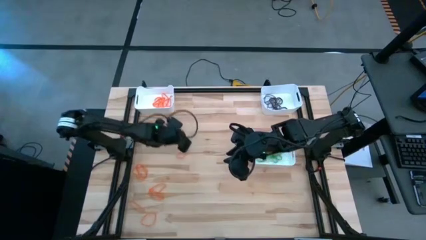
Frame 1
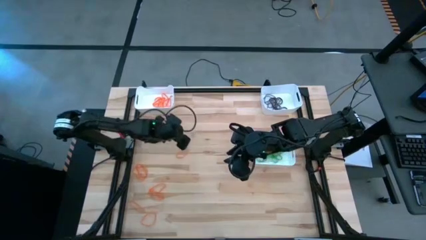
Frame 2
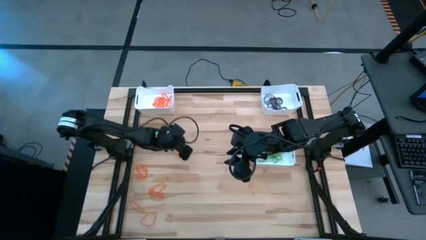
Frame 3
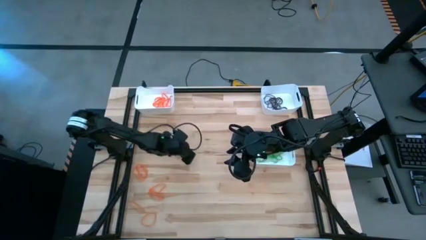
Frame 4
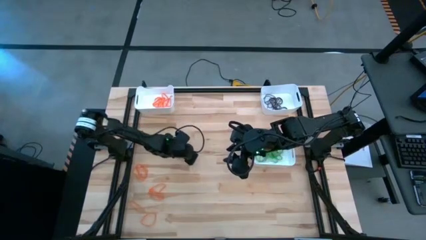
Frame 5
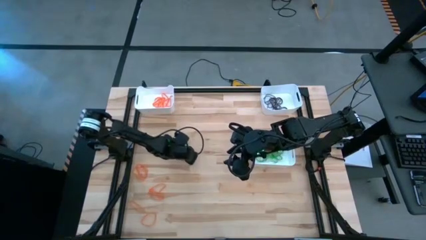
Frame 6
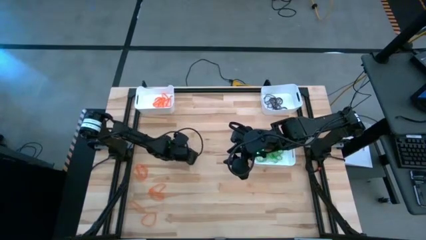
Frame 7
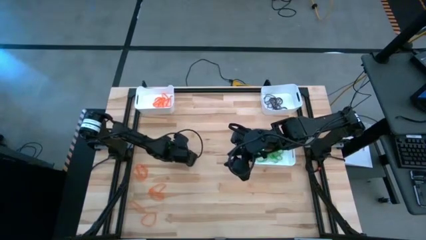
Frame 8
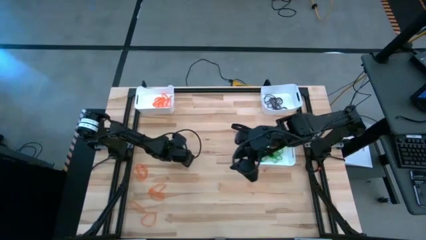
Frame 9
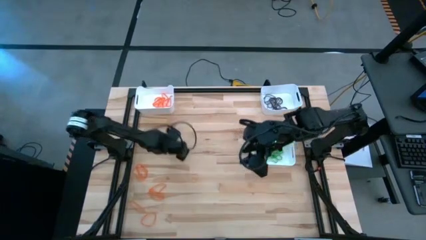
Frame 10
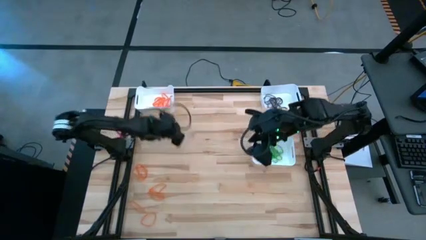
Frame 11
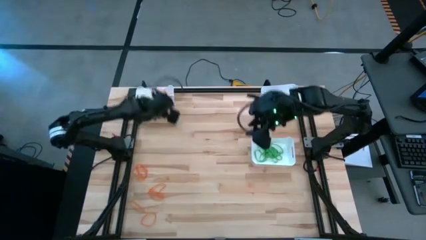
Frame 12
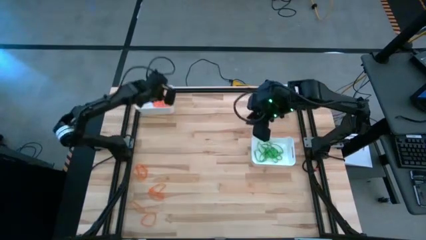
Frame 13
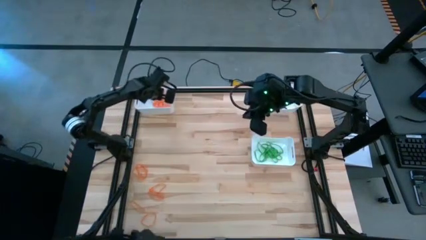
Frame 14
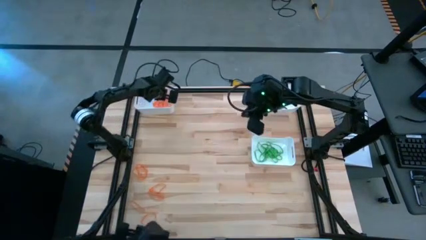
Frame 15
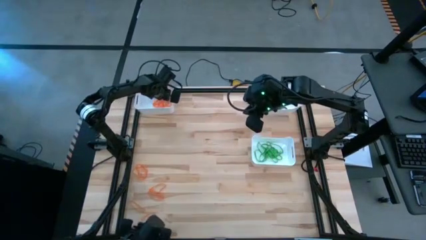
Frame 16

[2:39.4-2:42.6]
Task: Sort rubber bands into baskets
Put the orange rubber band into the top left white bin

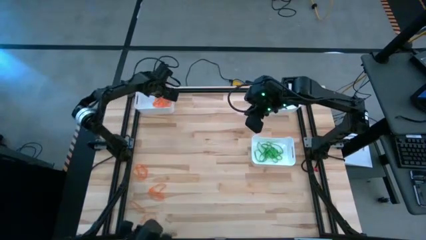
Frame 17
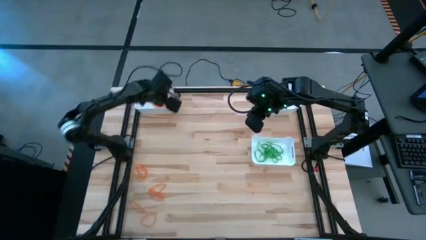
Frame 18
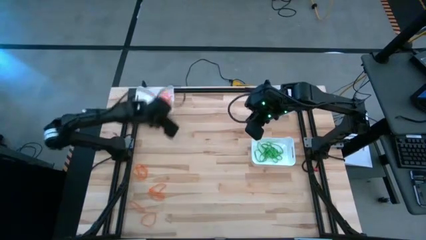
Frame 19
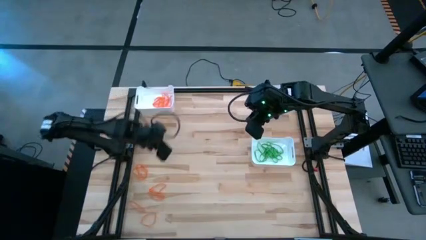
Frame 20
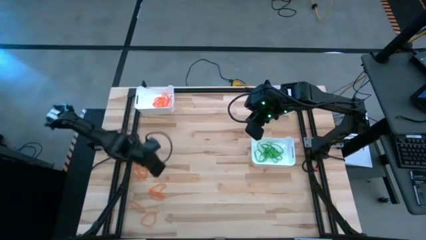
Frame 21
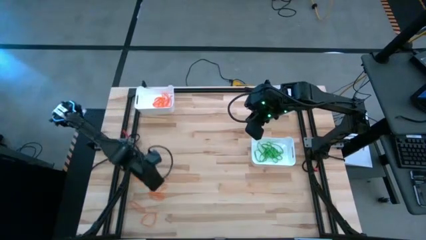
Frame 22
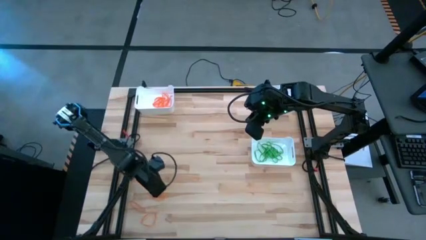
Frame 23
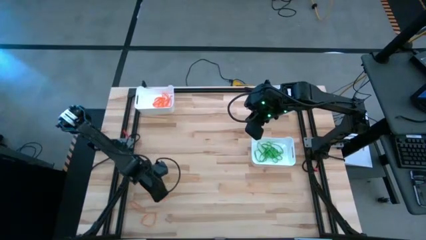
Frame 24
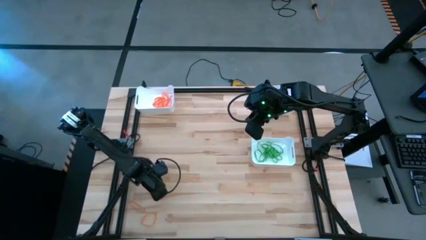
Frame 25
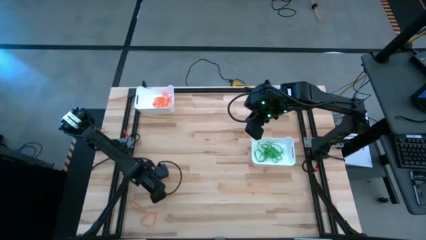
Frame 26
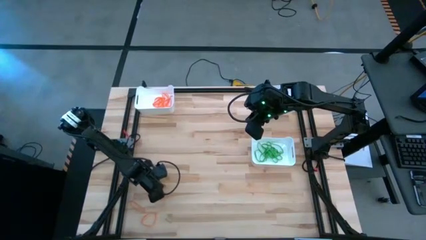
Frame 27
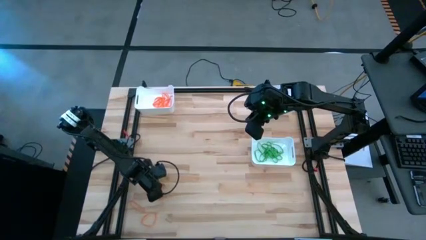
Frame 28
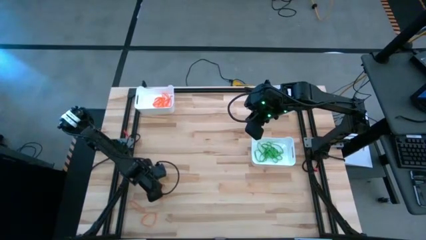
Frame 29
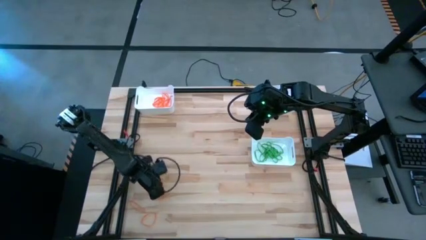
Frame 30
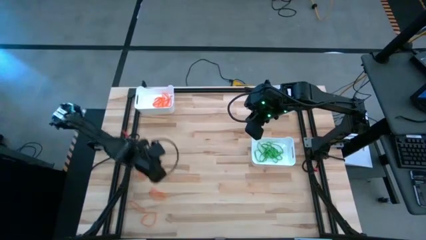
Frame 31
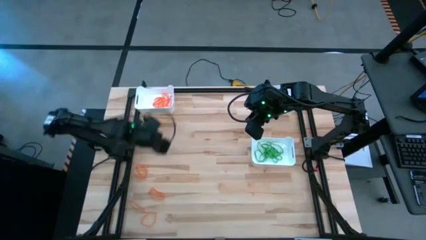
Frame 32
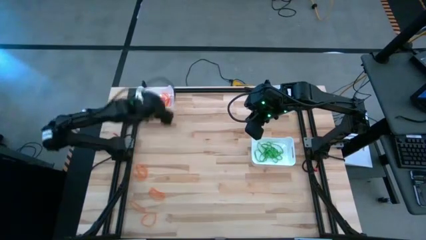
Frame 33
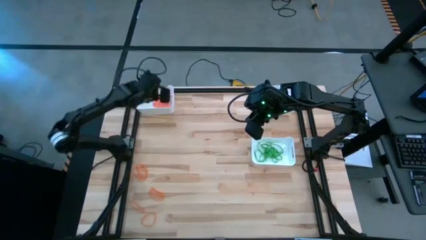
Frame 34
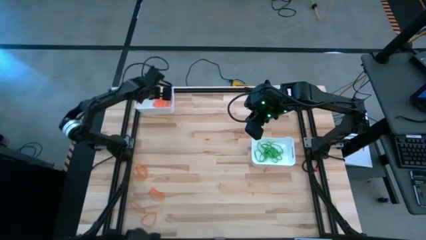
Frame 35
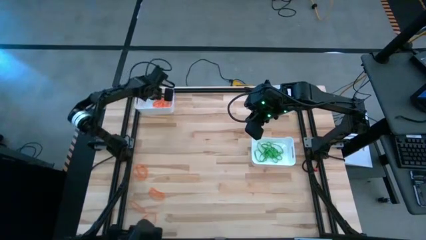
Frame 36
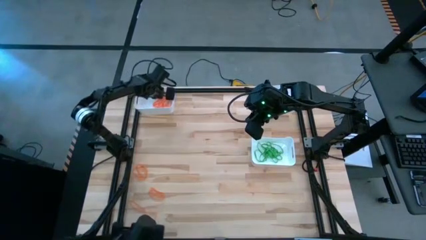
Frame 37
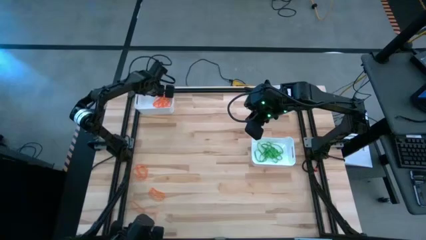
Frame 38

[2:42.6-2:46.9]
Put the orange rubber band into the top left white bin

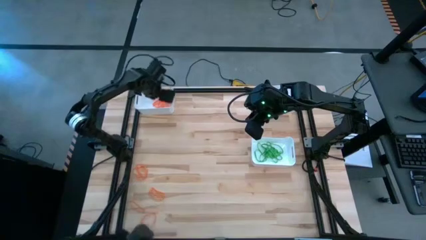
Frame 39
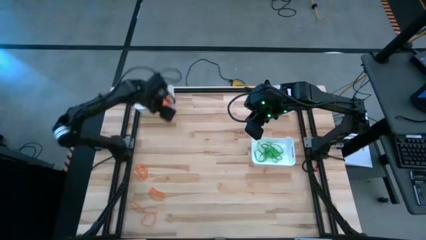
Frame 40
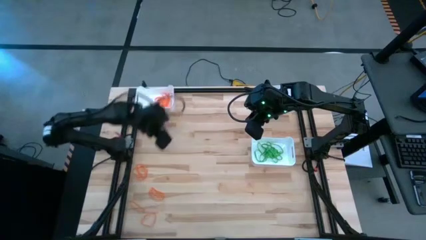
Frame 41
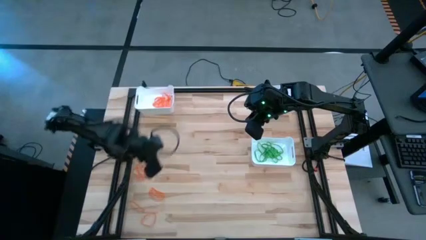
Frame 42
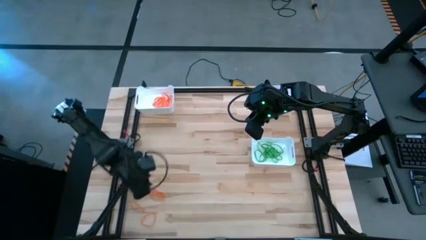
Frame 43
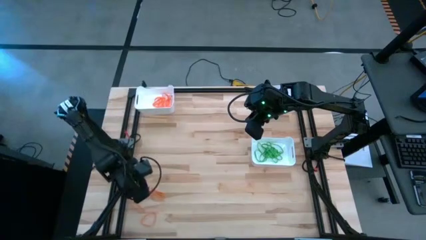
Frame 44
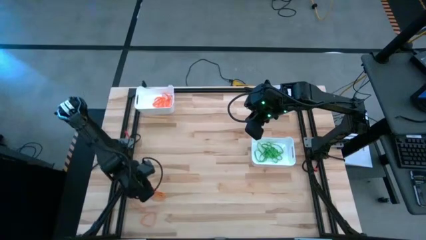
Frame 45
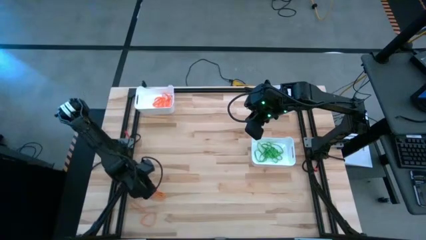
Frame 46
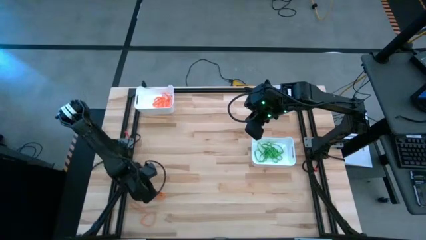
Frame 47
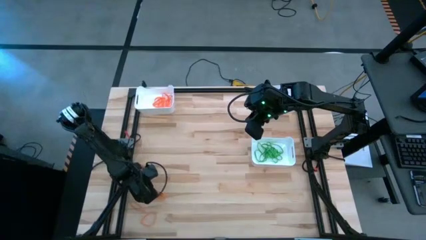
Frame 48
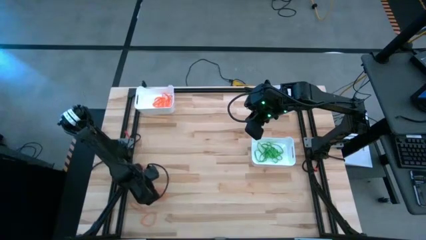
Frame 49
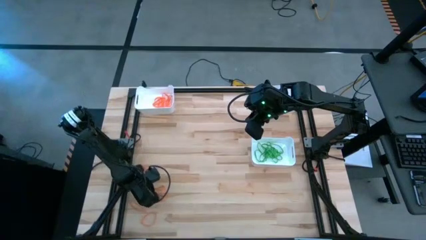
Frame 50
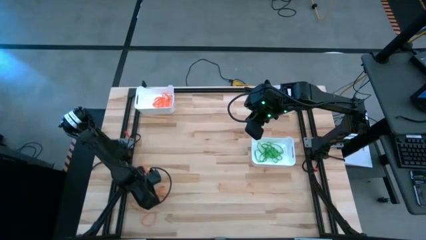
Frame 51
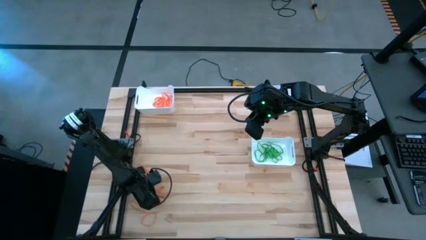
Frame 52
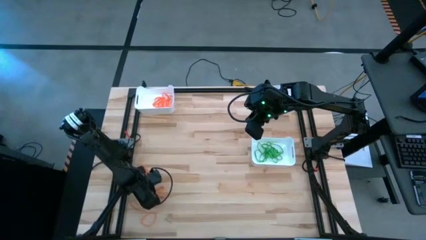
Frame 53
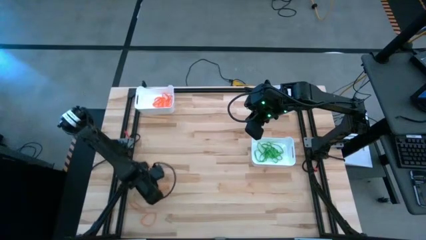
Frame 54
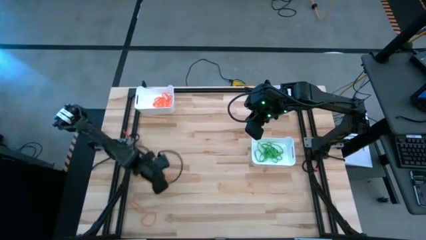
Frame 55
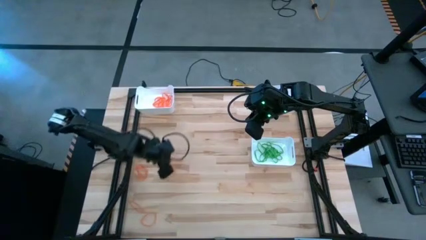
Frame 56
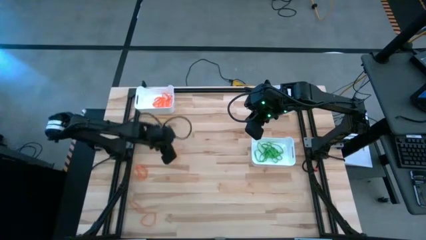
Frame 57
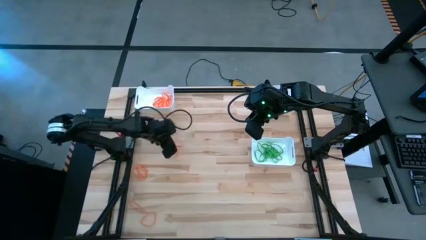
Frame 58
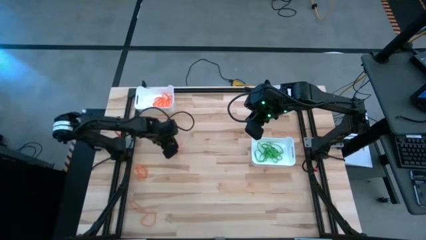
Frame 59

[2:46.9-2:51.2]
Put the orange rubber band into the top left white bin

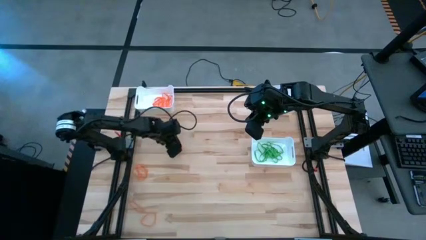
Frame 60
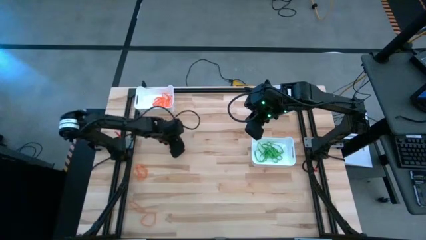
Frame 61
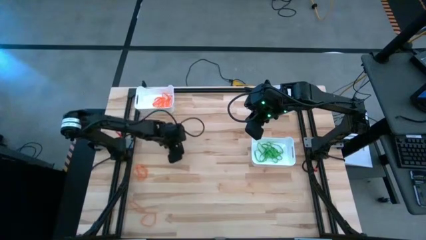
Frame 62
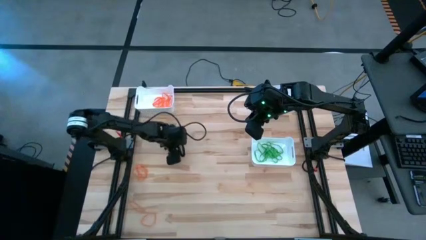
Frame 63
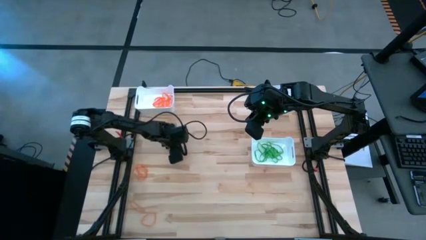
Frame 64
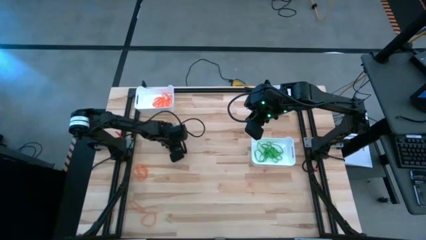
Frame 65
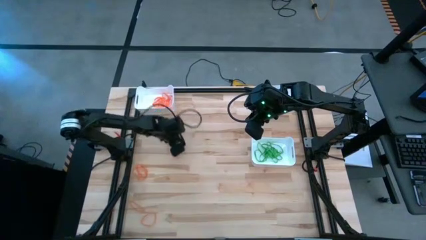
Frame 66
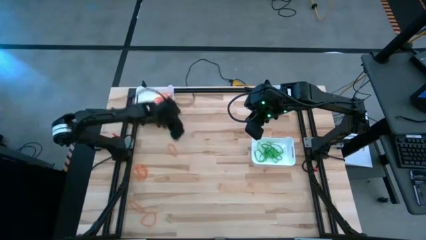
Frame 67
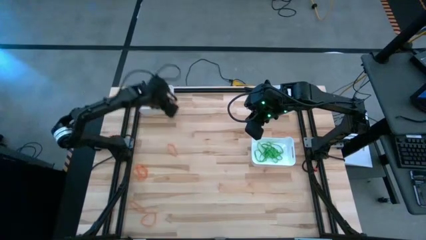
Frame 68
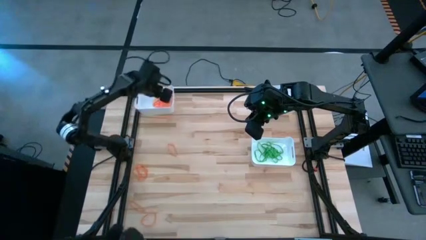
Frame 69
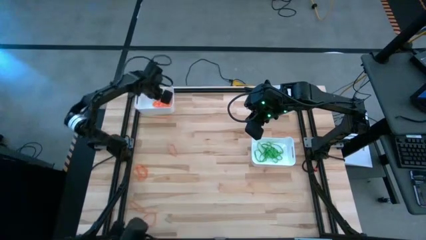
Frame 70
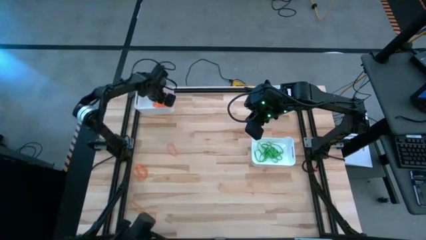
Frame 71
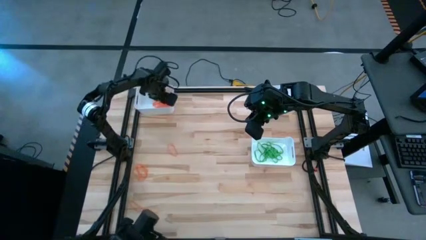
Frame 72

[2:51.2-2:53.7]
Put the orange rubber band into the top left white bin

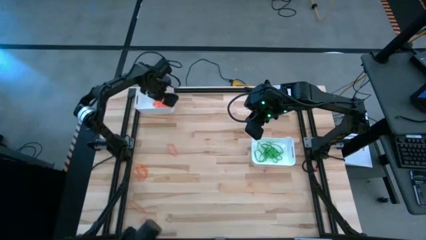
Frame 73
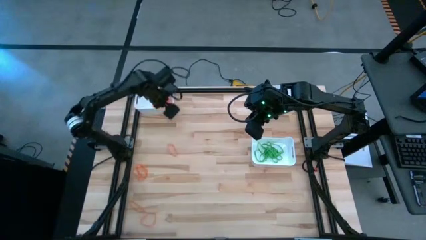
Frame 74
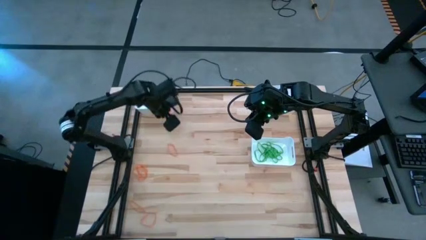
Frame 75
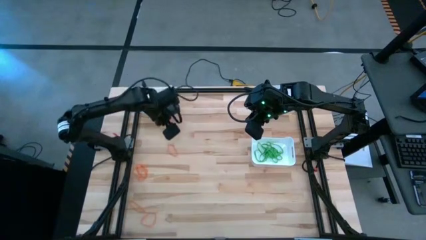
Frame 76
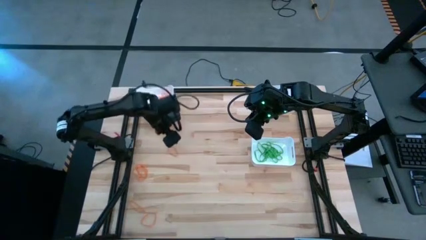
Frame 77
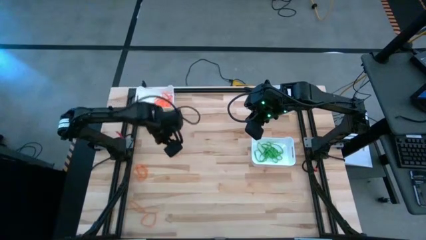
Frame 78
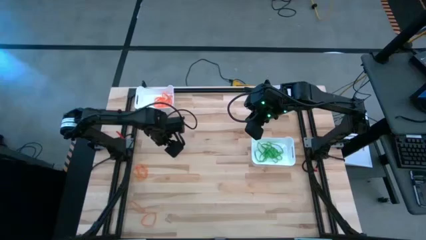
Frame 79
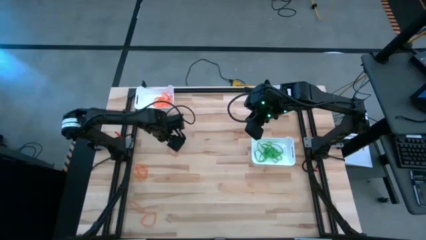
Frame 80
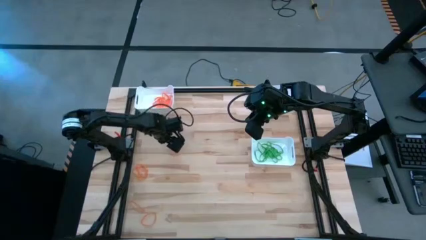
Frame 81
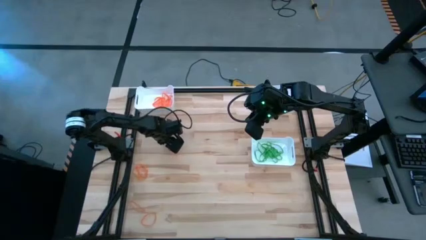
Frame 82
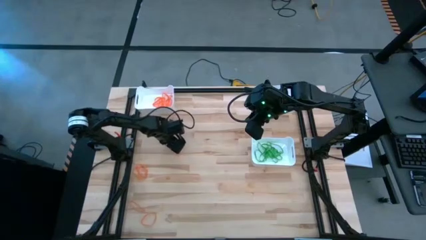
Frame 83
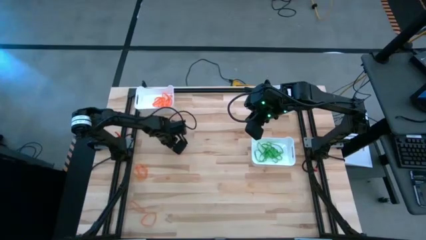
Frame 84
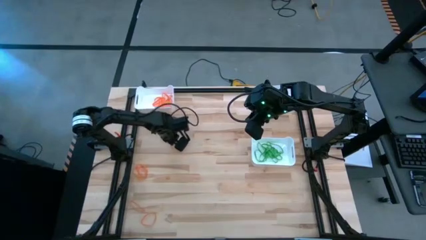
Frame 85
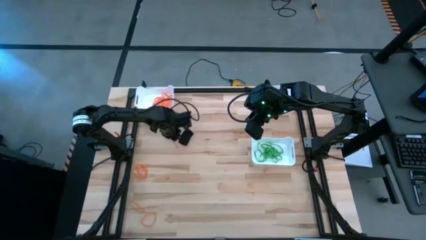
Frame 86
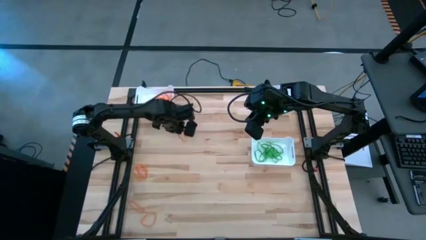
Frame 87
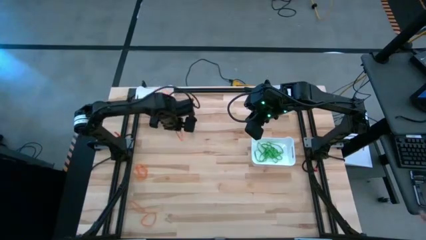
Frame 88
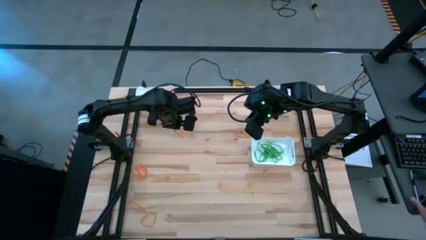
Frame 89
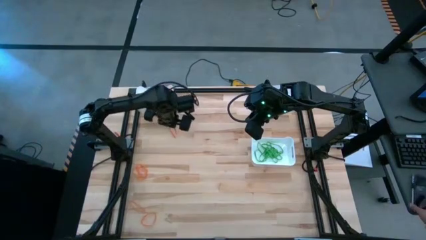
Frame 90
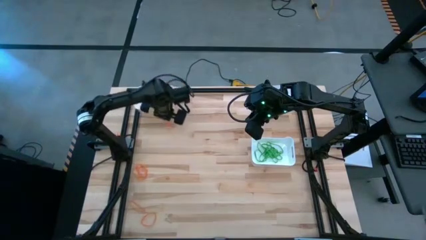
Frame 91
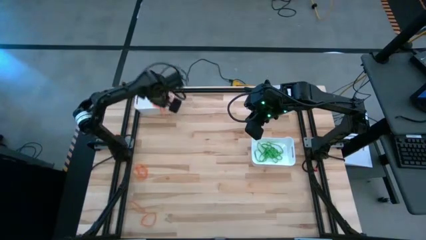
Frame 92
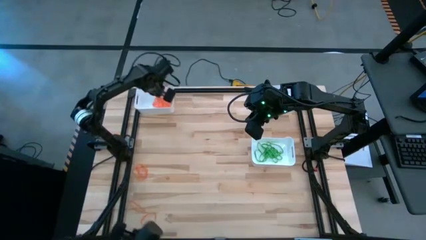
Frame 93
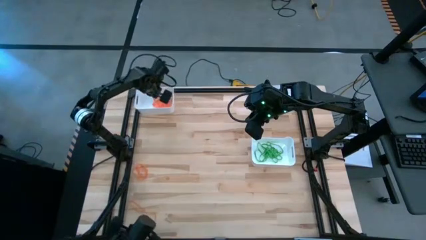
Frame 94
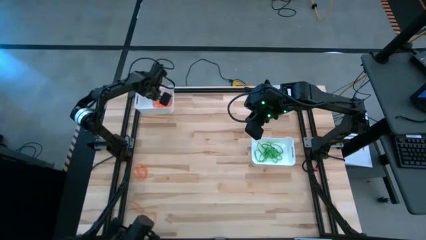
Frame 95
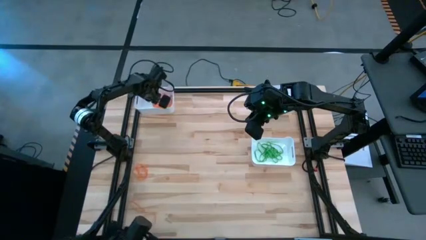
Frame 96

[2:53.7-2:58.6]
Put the orange rubber band into the top left white bin
